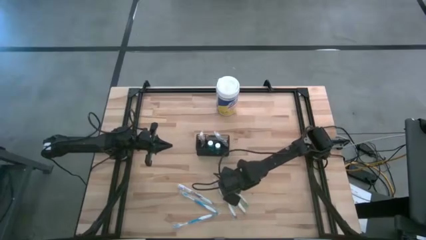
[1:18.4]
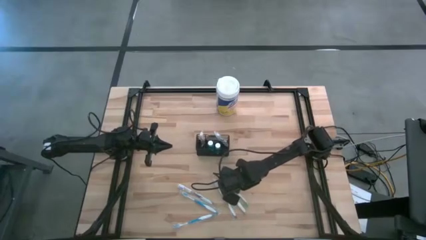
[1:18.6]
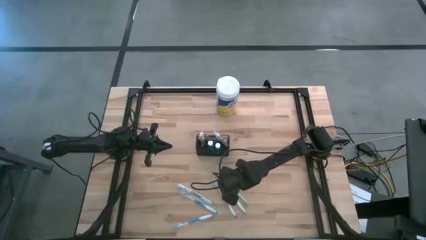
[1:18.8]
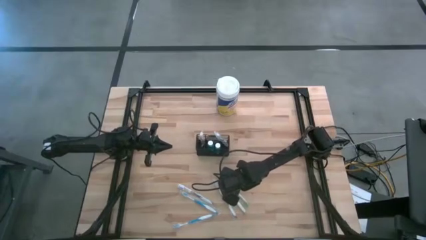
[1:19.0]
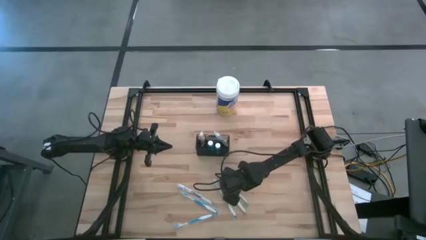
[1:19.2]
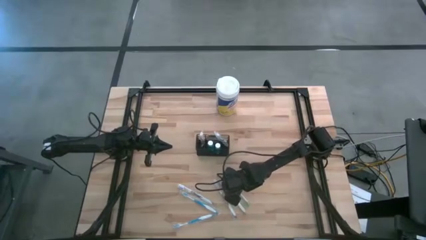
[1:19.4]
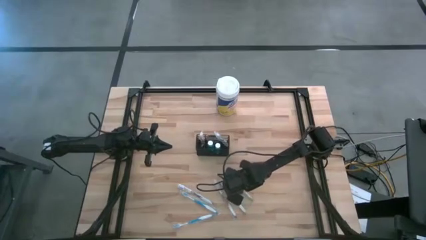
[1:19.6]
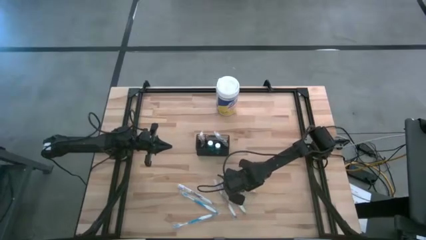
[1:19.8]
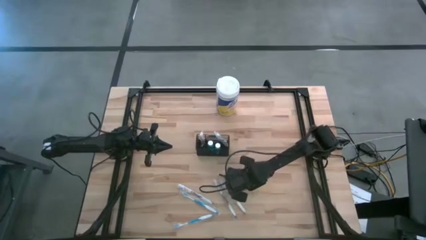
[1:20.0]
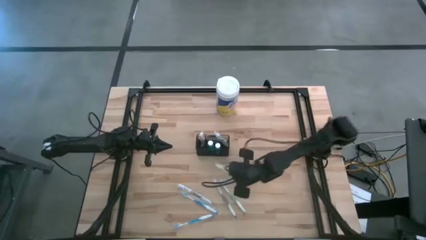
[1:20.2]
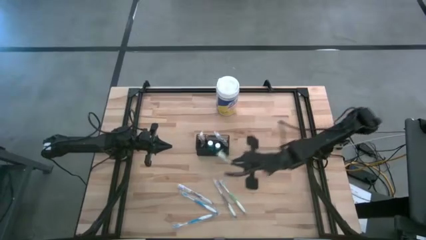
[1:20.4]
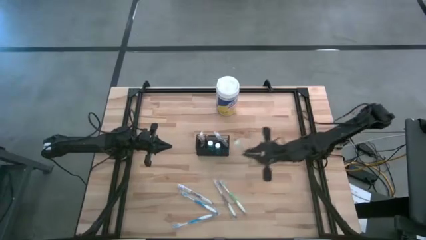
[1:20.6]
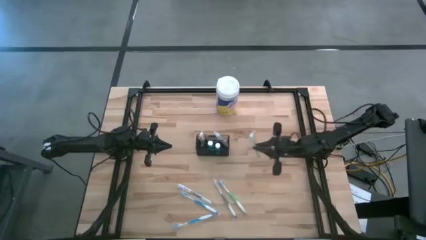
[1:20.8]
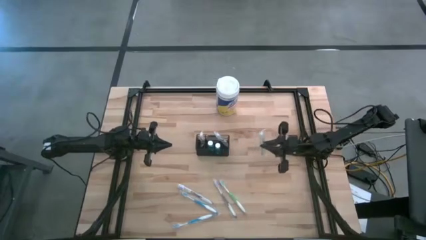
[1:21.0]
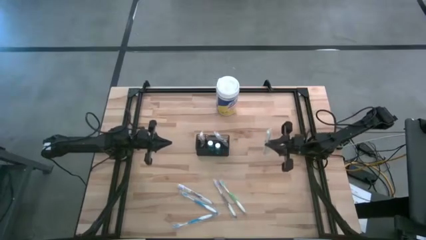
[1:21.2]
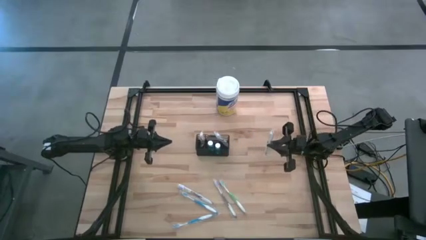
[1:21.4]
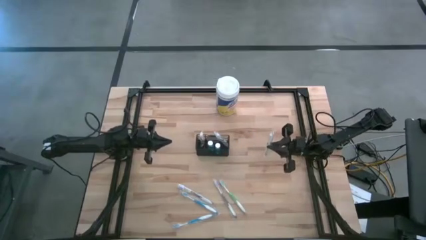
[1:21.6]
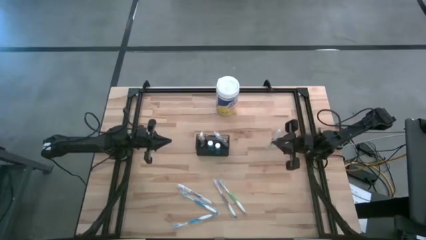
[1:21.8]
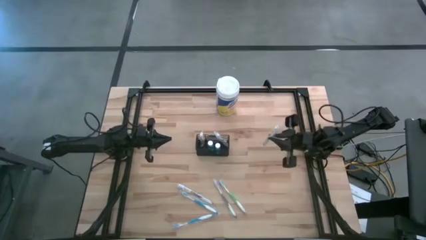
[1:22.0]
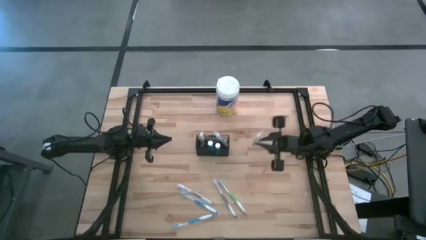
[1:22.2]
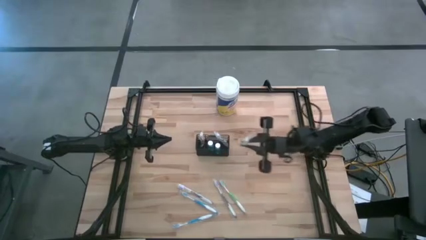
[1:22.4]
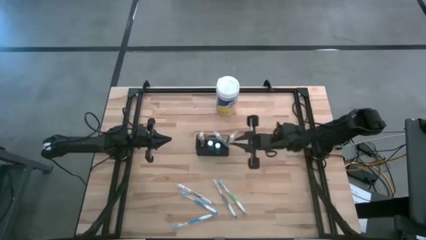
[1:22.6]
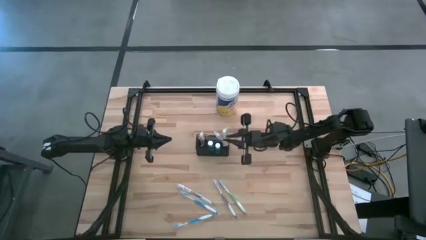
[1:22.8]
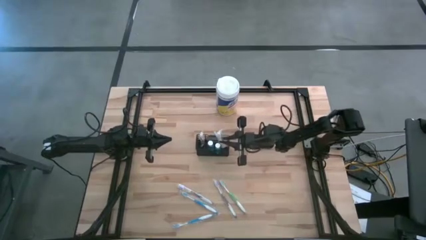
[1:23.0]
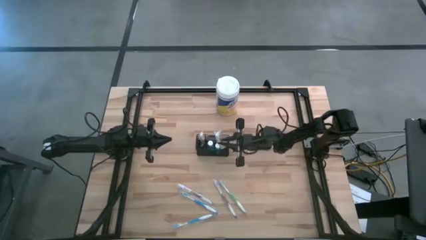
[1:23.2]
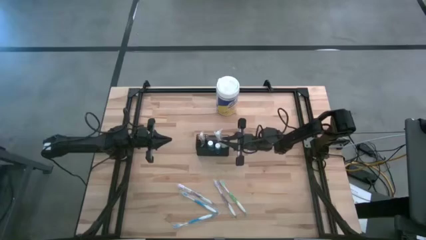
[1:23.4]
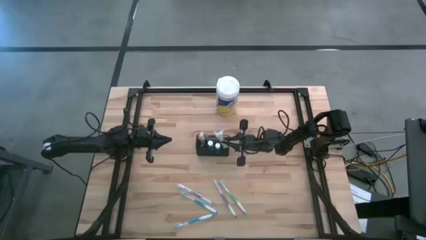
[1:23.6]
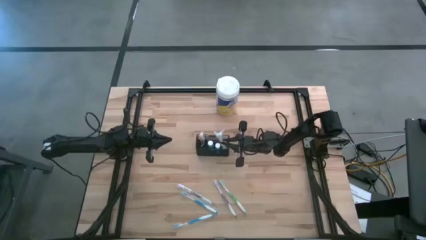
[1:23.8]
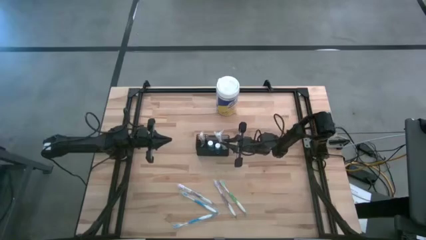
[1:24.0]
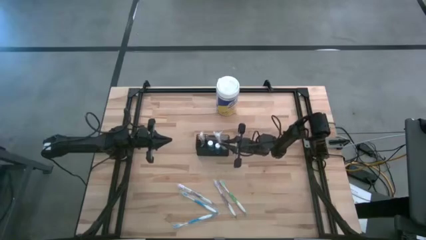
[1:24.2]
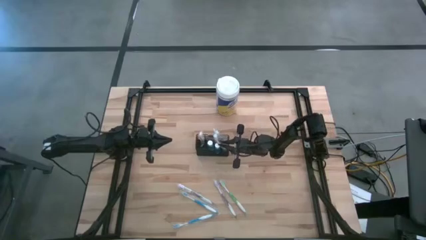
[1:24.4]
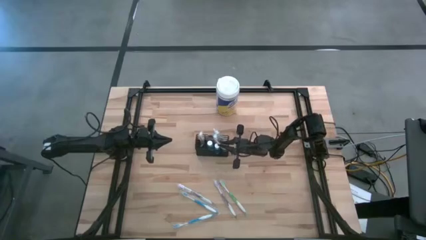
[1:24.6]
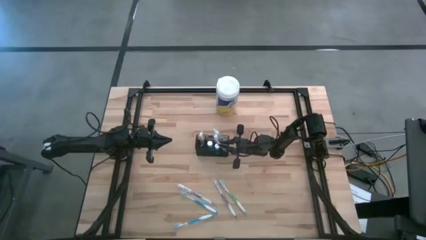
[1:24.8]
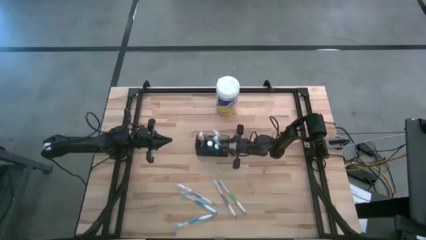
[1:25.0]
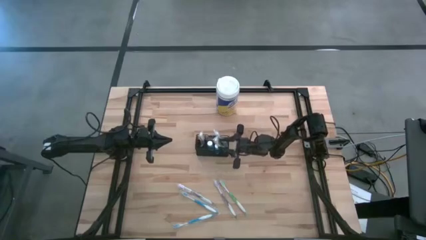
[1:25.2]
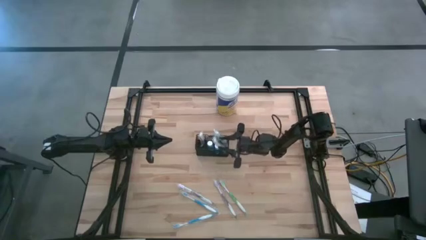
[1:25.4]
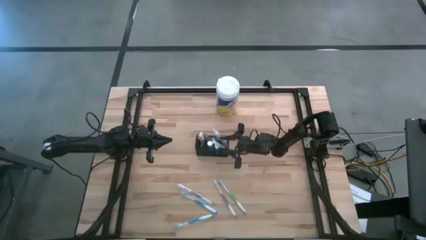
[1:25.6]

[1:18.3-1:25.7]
Task: Pick & Place toothbrushing station
Put the right green toothbrush into the black wire organizer

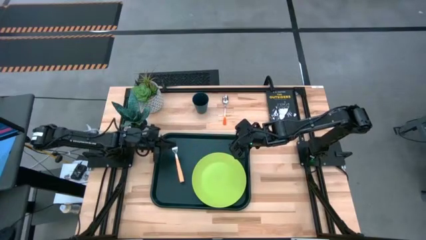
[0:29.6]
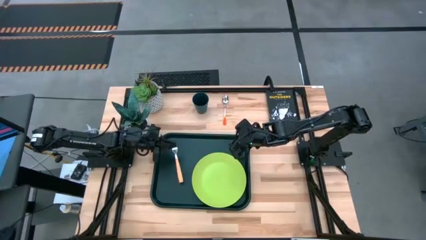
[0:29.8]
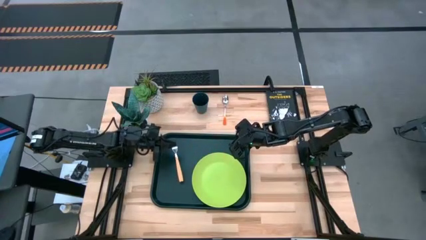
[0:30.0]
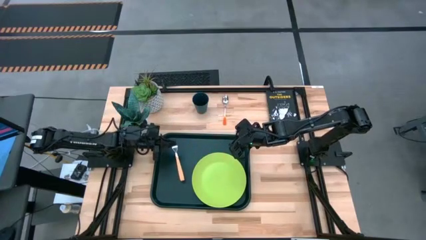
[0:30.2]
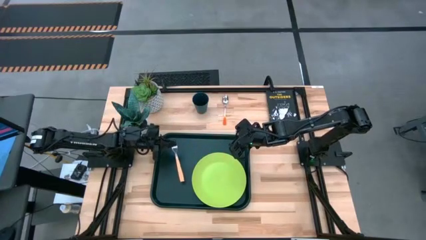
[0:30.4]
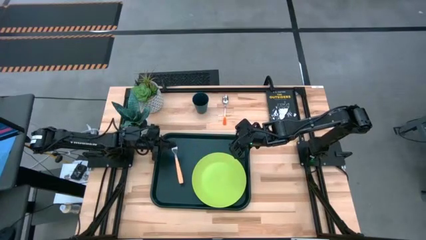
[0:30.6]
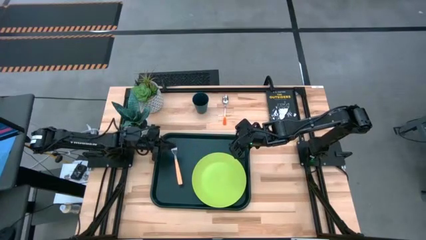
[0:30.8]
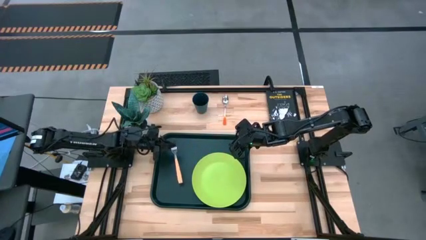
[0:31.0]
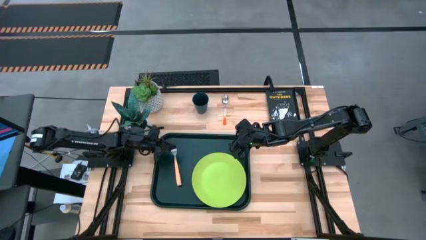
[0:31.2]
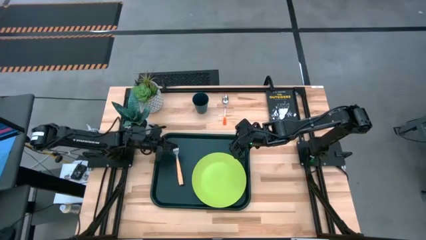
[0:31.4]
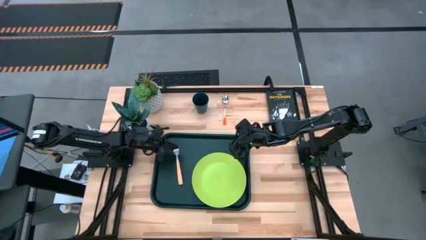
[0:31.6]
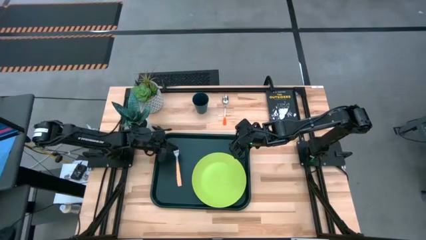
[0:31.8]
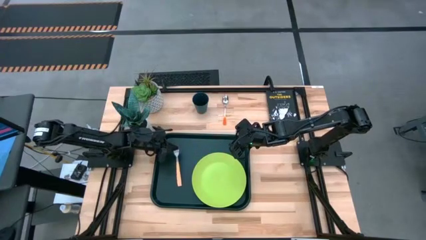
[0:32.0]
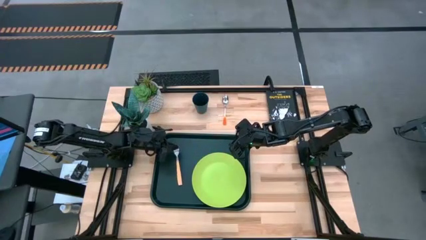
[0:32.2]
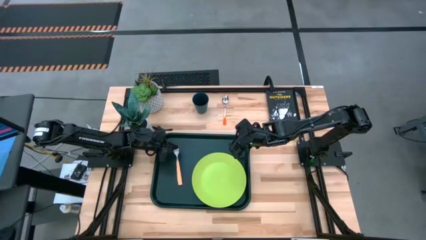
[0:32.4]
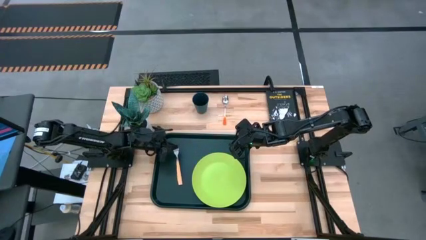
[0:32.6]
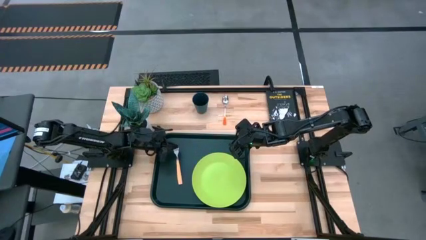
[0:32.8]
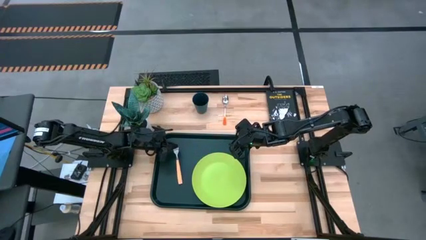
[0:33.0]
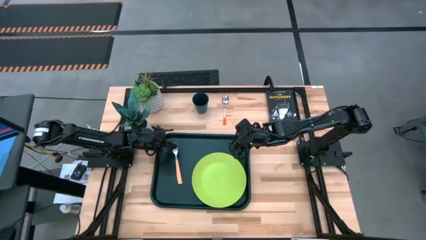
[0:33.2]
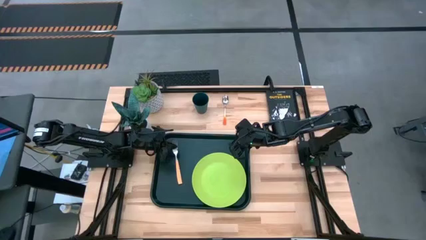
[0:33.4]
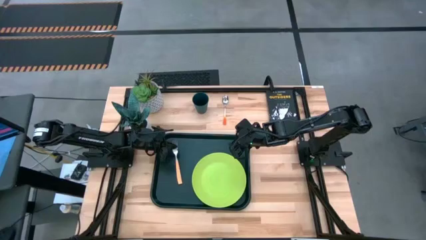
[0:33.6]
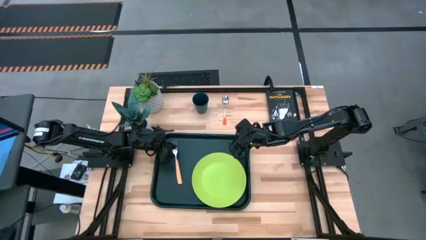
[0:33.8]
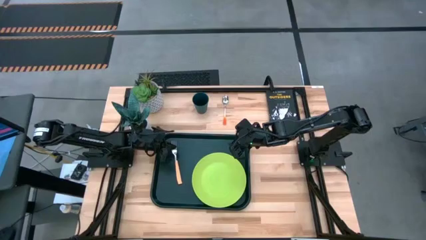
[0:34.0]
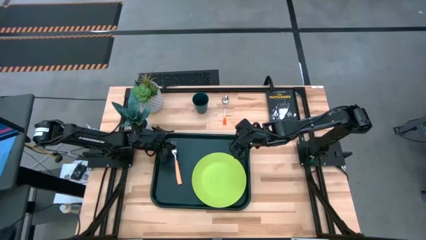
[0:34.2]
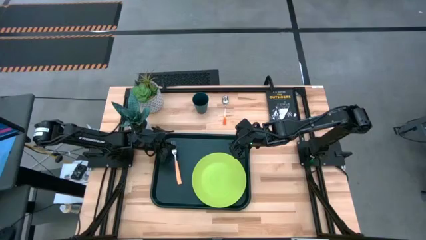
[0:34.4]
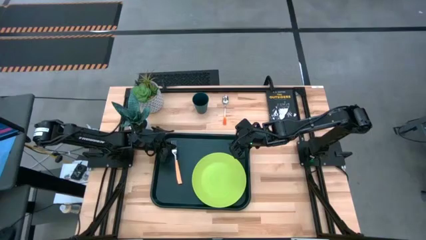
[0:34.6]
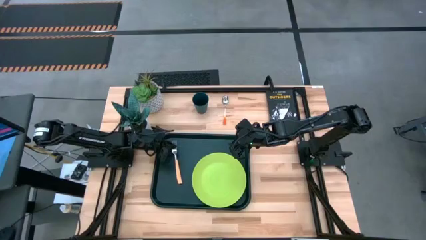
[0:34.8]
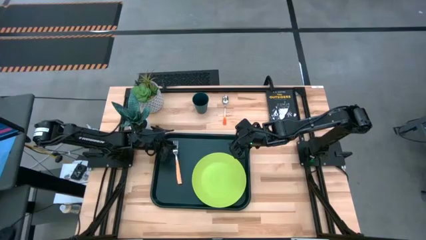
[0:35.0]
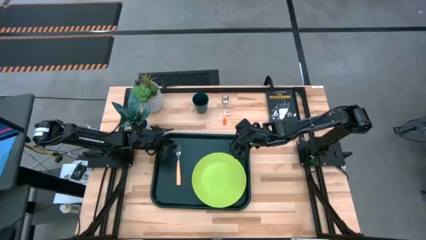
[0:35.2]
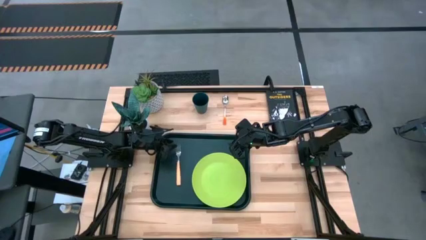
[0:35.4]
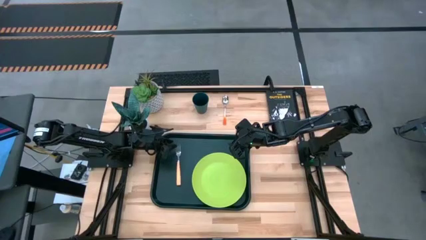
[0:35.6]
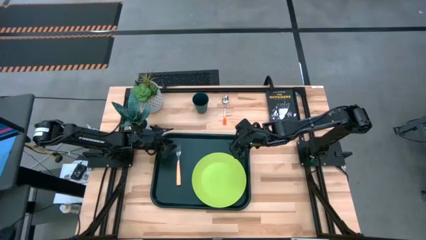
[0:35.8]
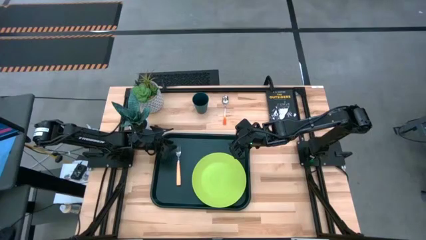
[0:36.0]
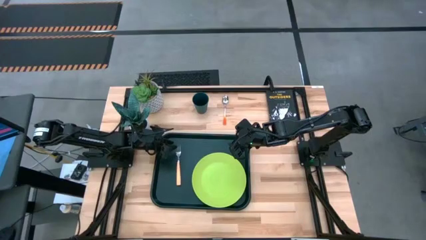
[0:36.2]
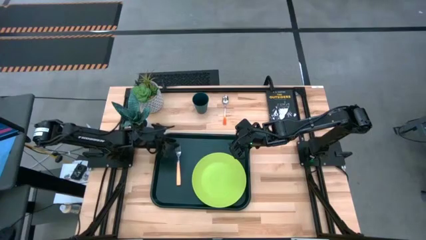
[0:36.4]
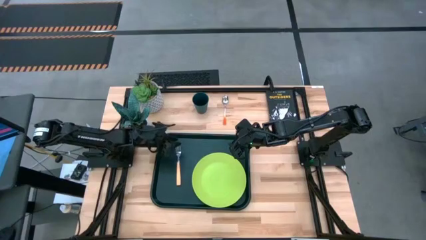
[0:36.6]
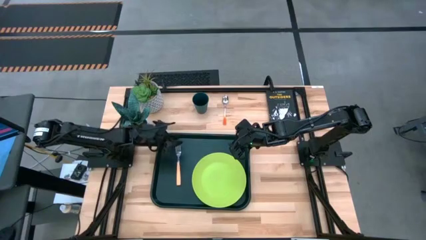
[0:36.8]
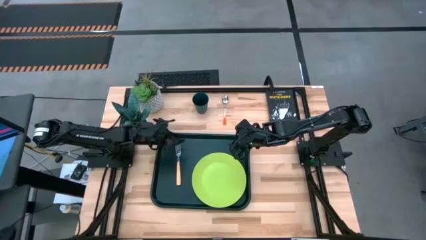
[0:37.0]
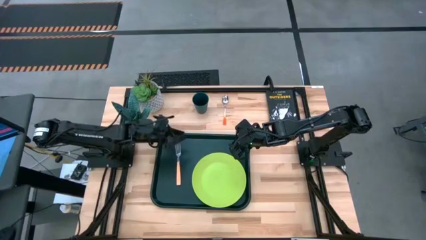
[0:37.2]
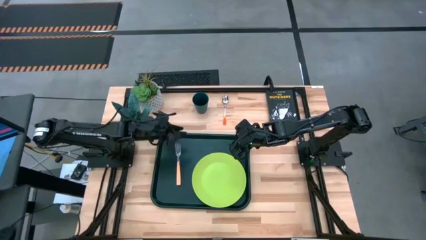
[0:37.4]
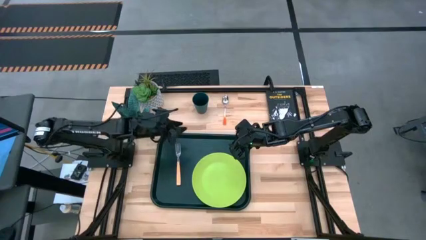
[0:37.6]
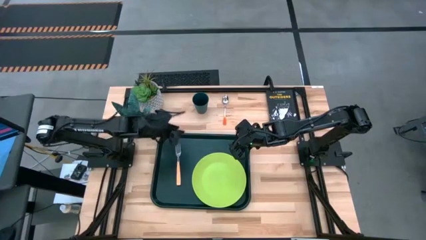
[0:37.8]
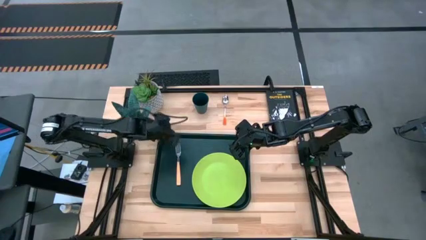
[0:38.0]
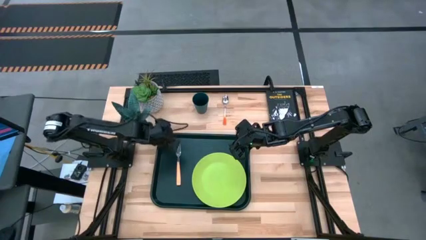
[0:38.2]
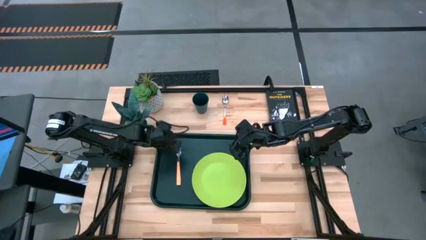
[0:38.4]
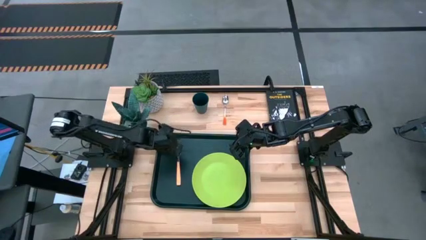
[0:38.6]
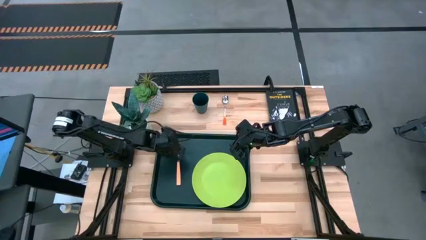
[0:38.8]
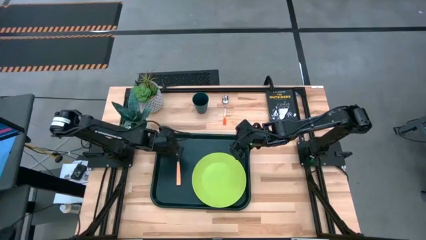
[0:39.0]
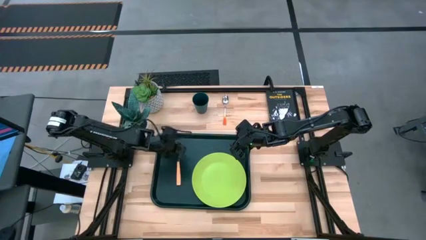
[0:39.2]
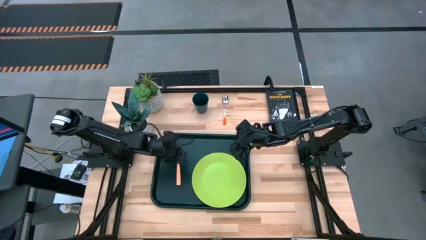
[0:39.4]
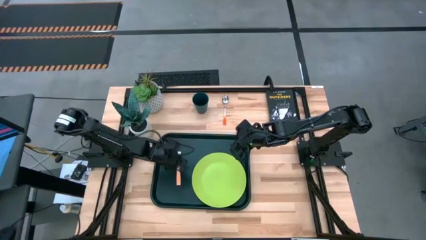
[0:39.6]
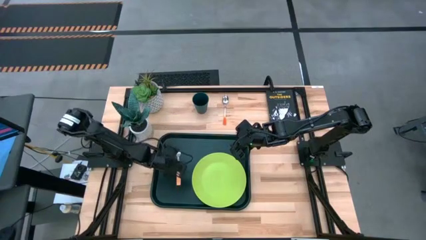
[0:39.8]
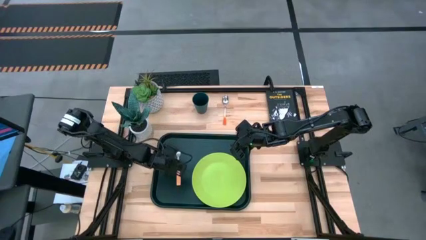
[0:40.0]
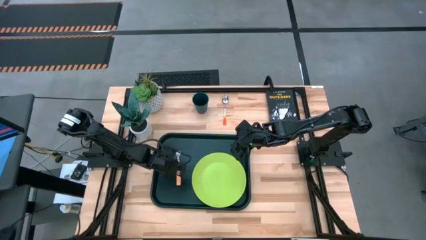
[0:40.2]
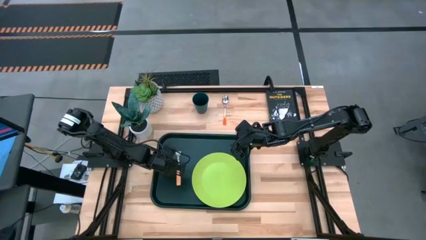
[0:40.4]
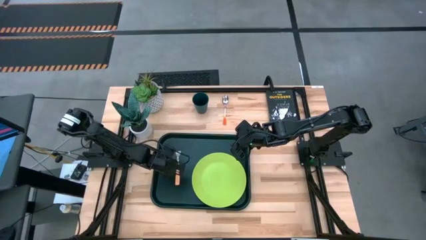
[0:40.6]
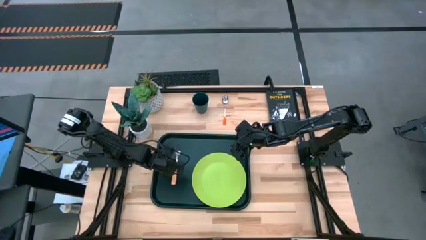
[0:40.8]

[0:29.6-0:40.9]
Task: Pick and place plate/cup/fork/spoon on tray
Put the orange fork on the black tray to the left of the green plate
